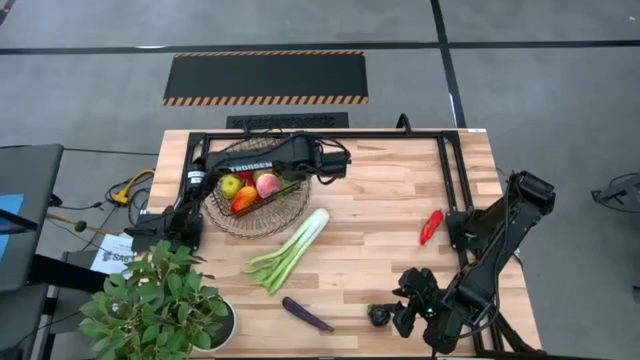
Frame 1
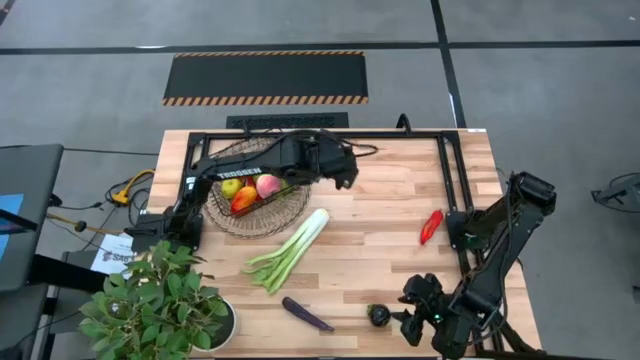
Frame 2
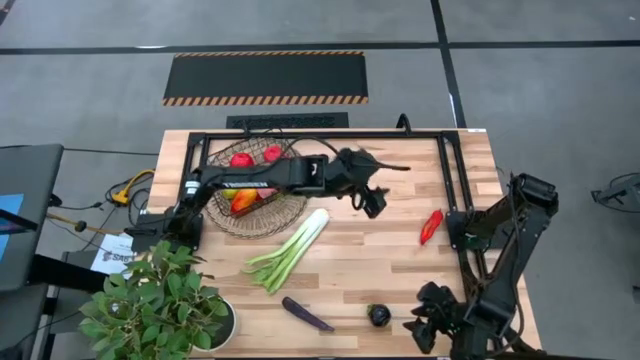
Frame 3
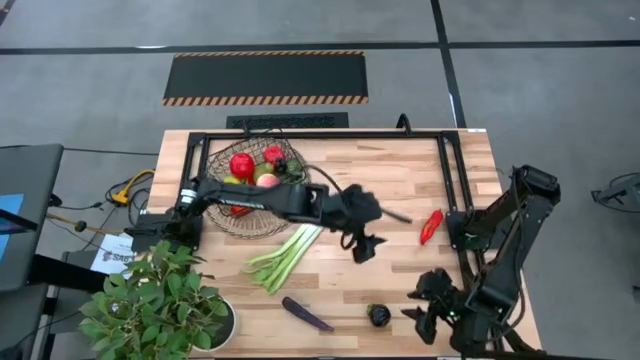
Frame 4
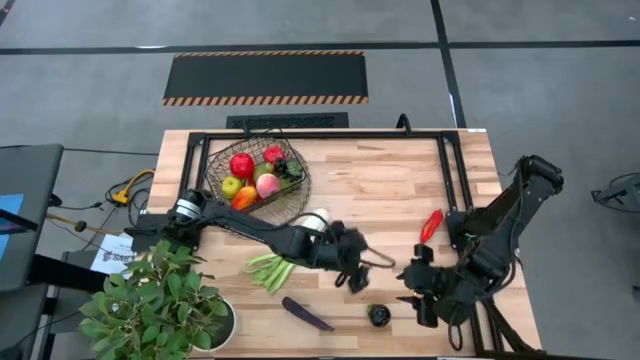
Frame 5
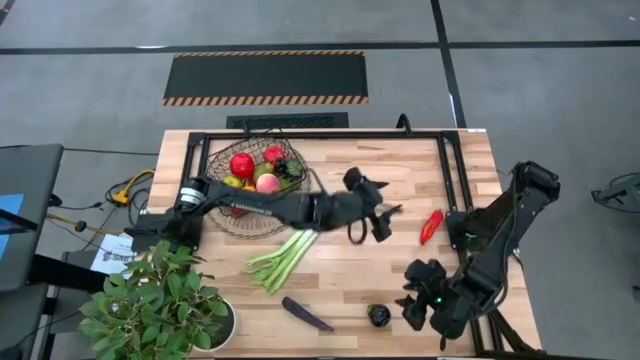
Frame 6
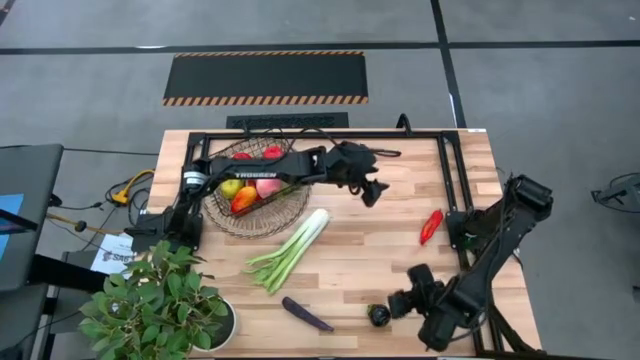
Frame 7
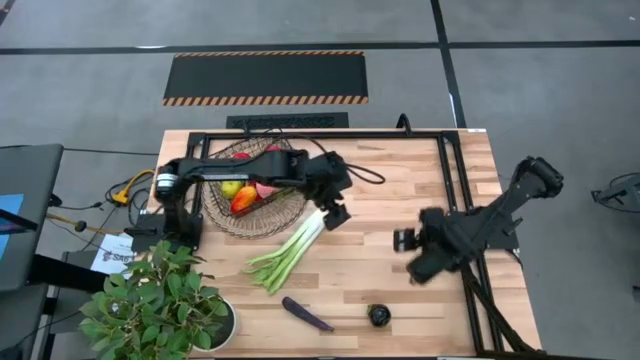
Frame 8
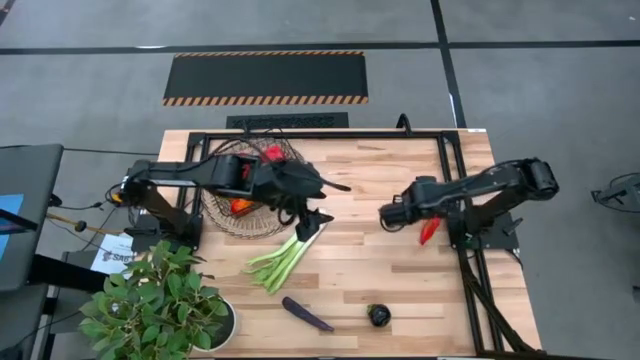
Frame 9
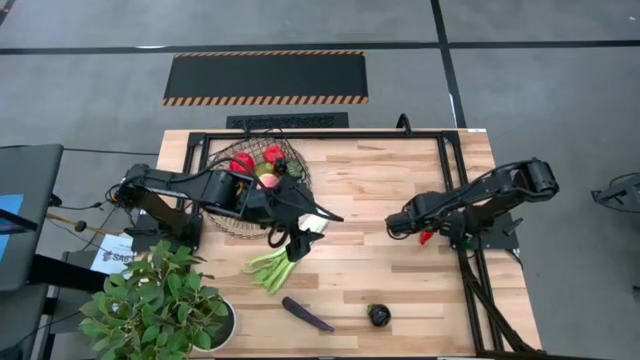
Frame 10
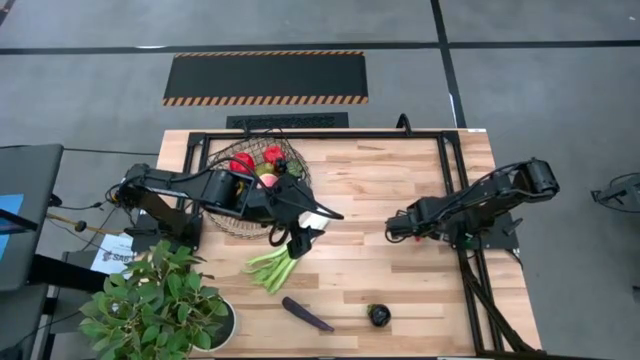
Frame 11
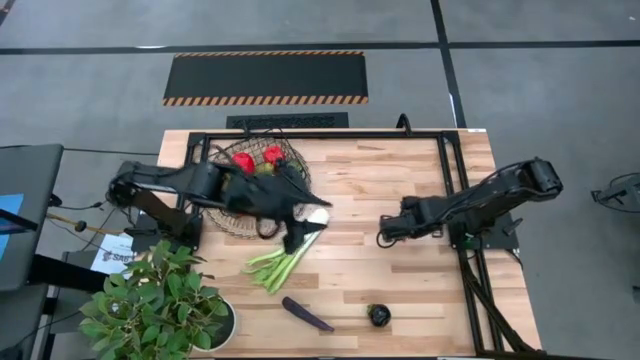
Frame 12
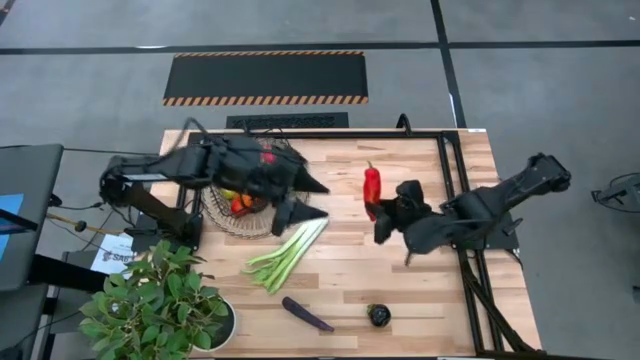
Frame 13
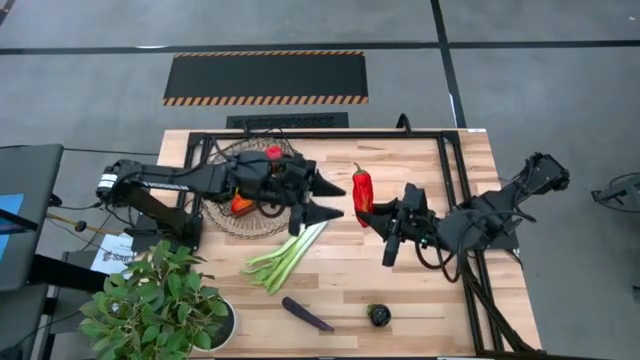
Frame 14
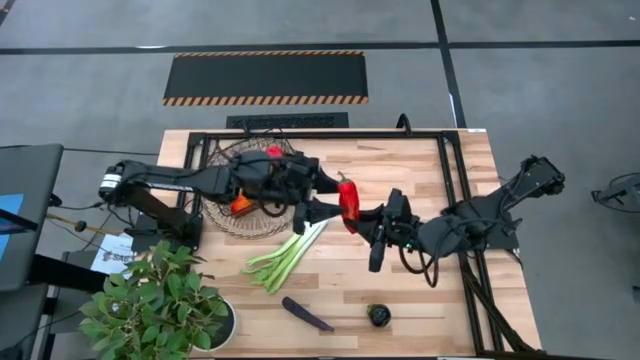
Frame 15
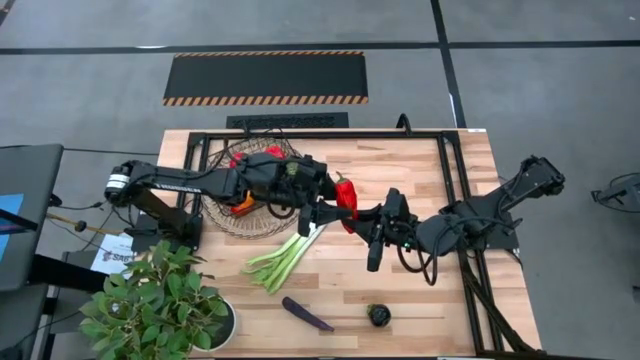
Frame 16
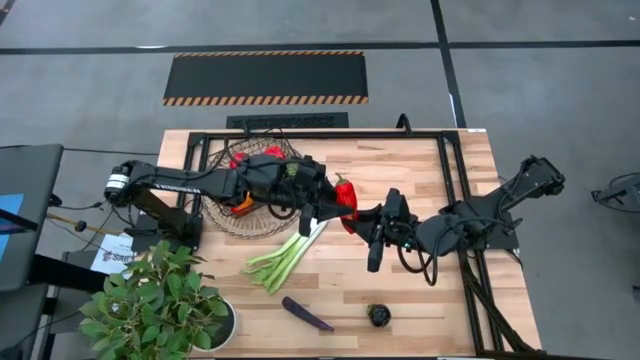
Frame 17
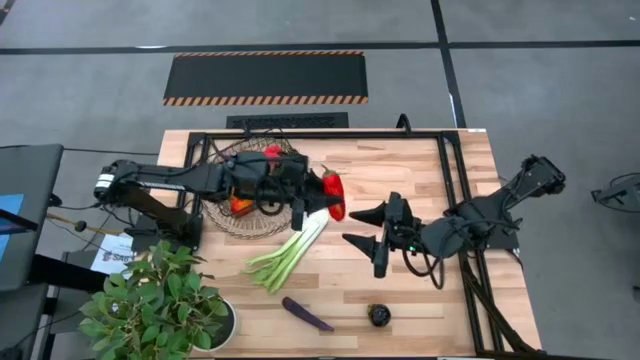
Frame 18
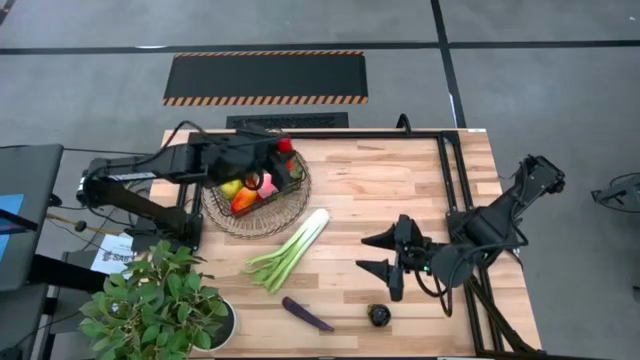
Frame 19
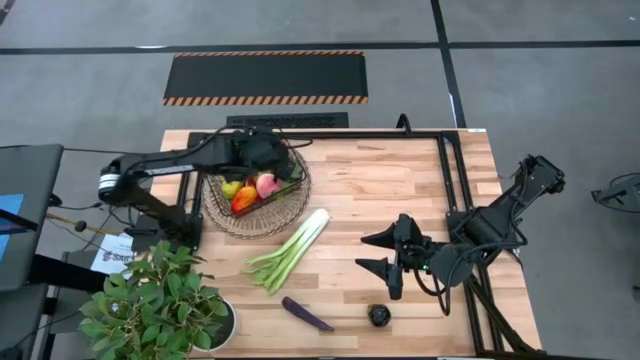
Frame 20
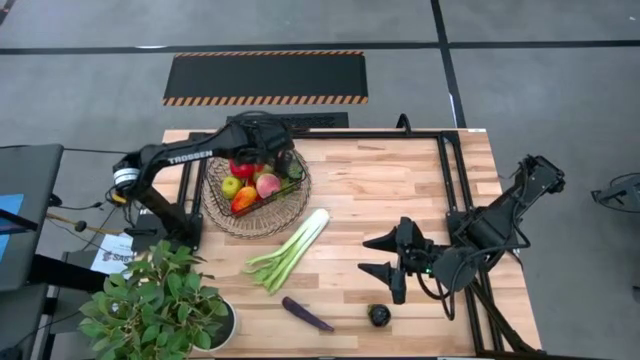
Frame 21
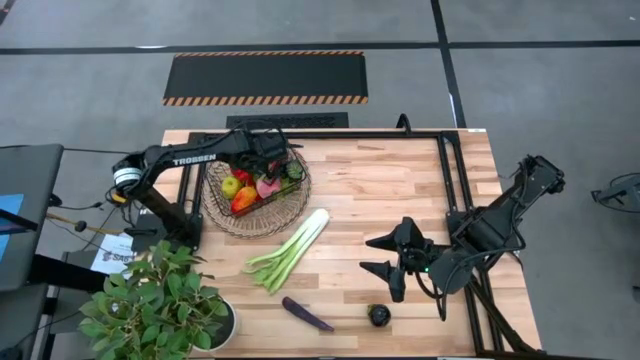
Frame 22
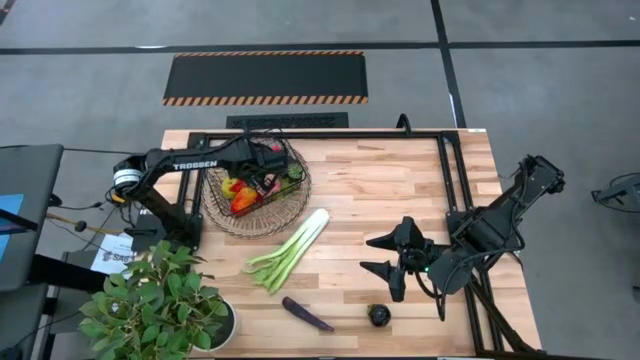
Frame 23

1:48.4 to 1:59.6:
Task: Build produce basket
Put the red chili pepper into the wire basket

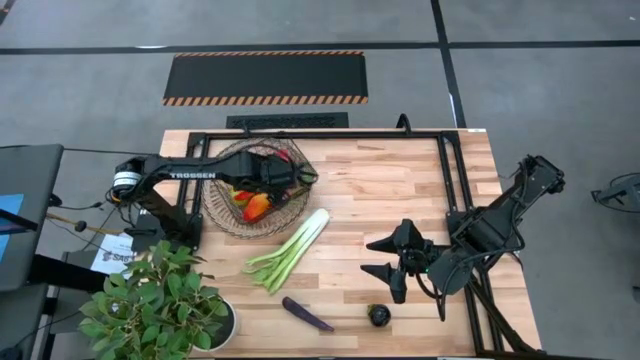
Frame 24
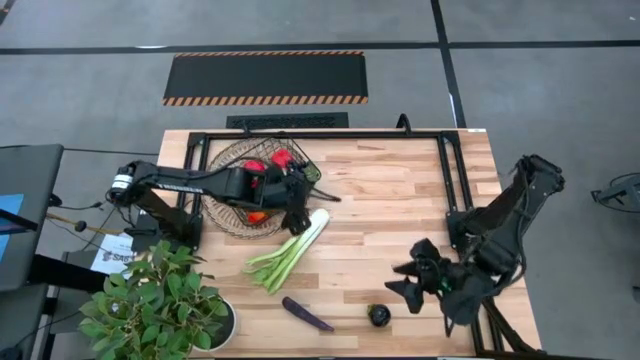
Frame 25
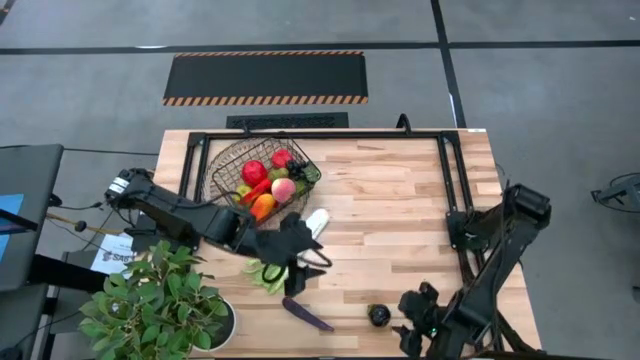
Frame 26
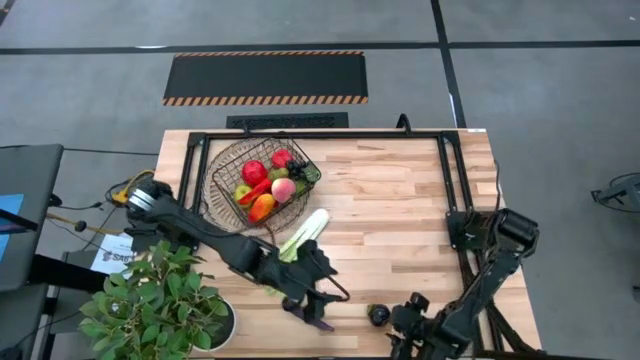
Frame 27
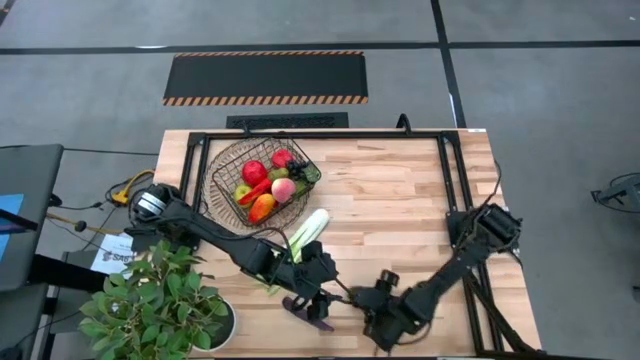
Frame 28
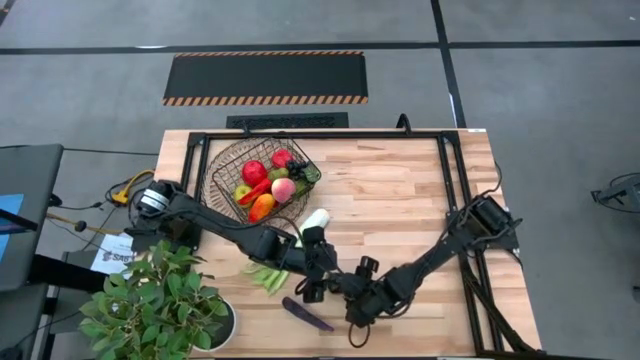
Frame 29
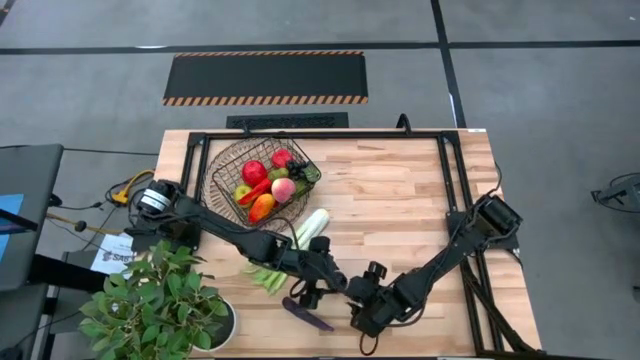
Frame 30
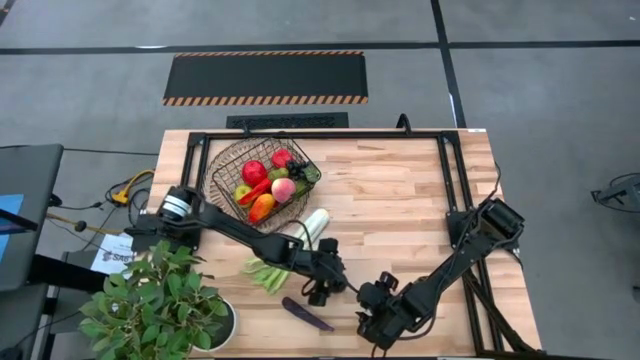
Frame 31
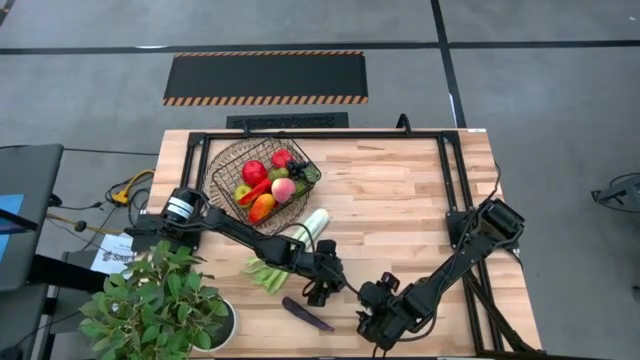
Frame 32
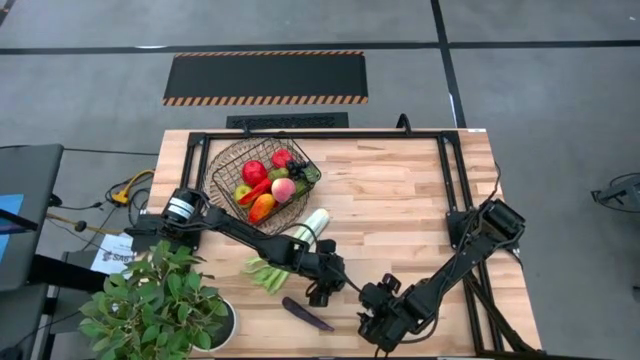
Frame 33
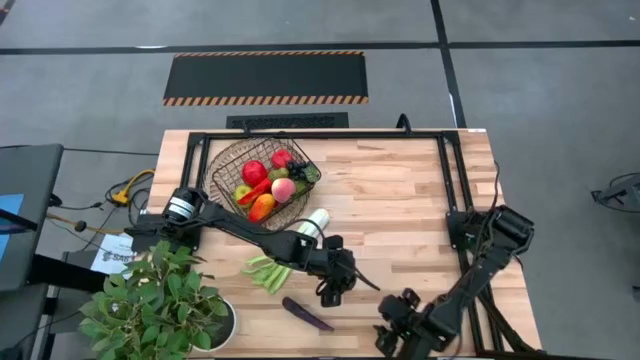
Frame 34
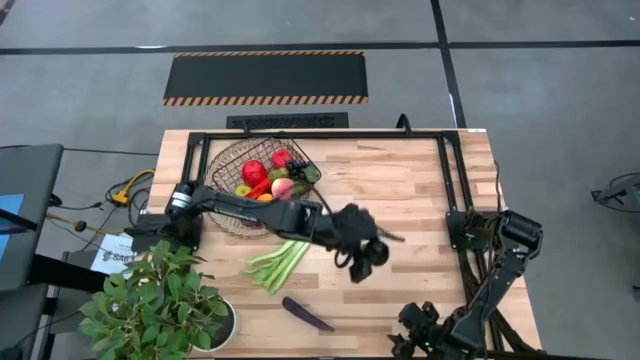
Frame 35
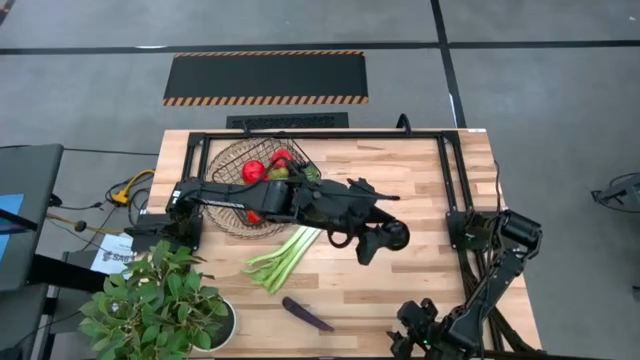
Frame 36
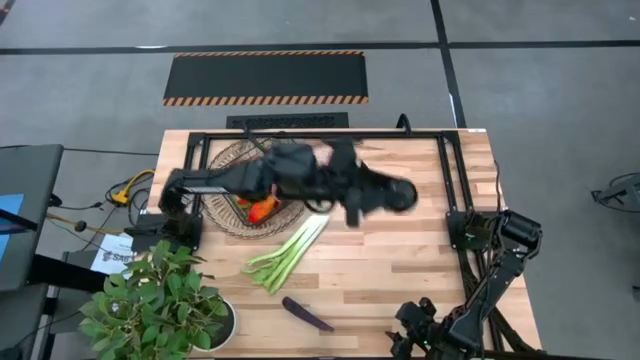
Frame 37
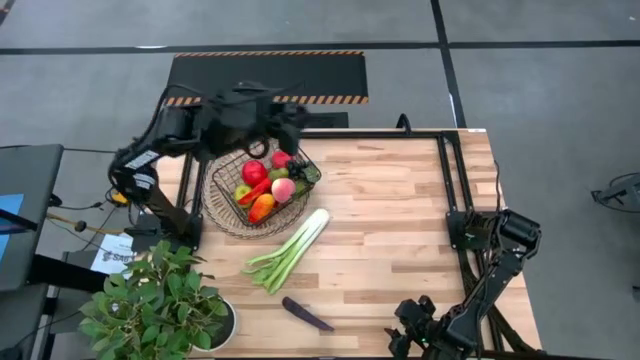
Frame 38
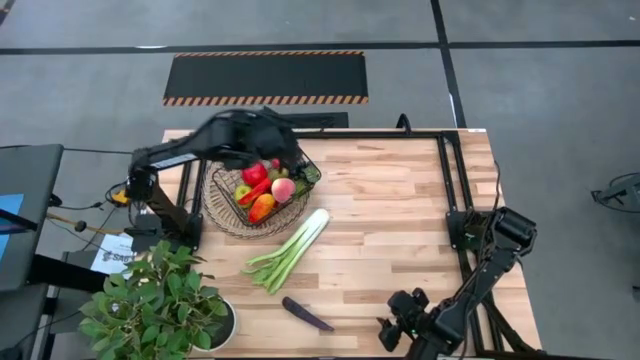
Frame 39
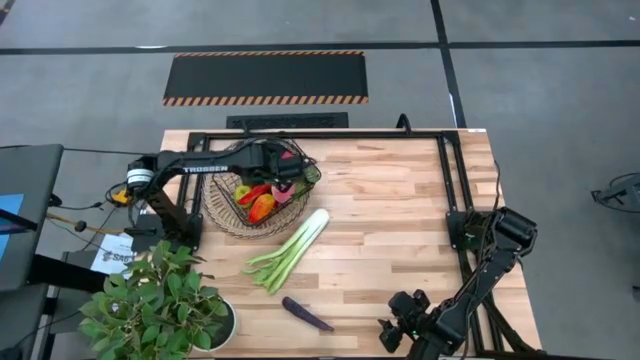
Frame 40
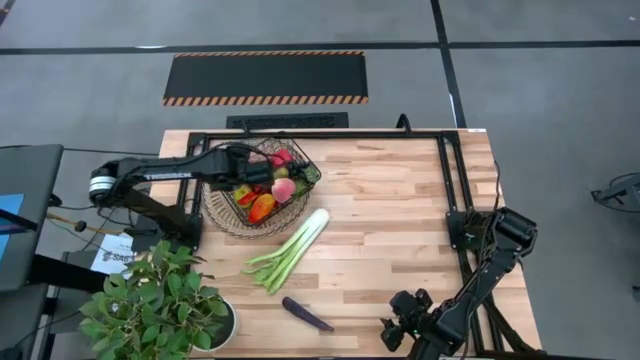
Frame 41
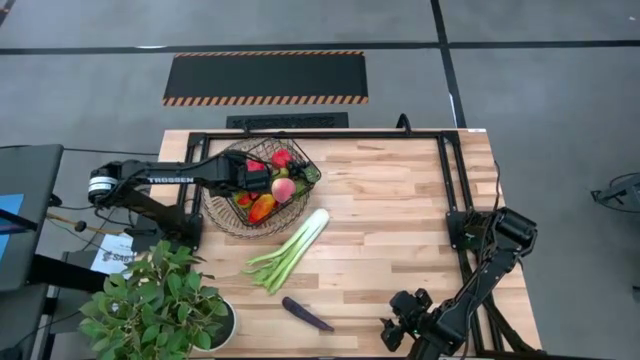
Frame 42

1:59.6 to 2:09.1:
Put the black mangosteen into the wire basket
